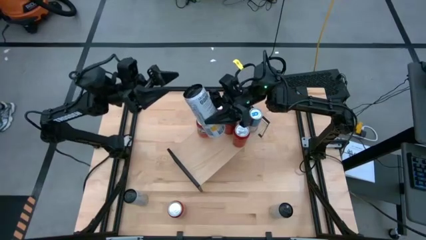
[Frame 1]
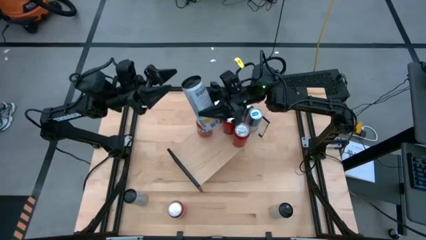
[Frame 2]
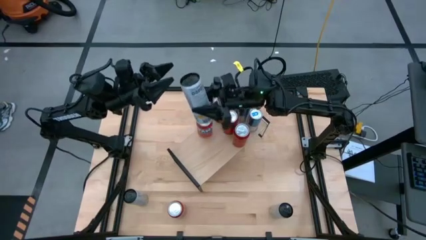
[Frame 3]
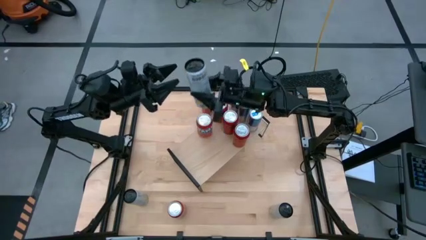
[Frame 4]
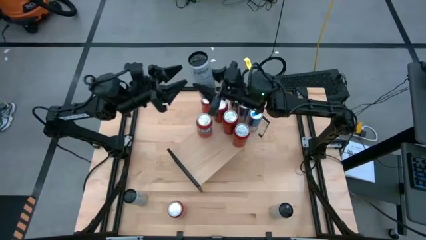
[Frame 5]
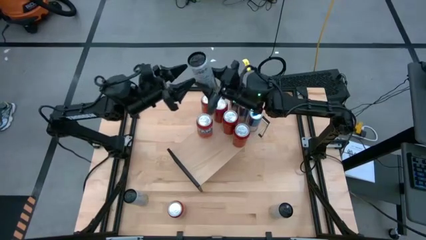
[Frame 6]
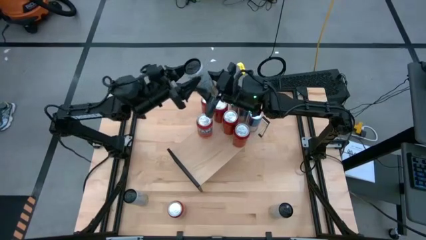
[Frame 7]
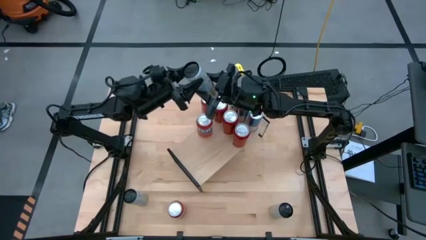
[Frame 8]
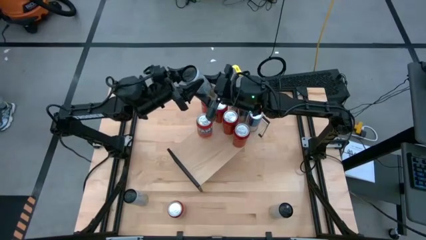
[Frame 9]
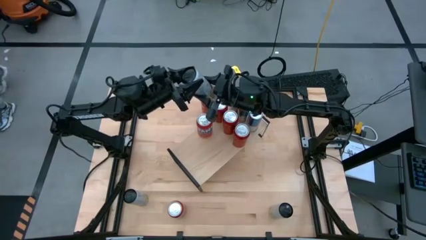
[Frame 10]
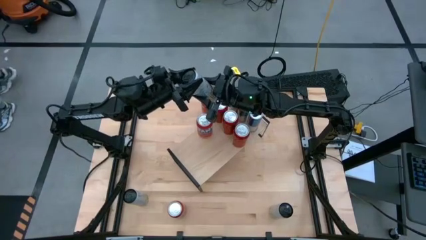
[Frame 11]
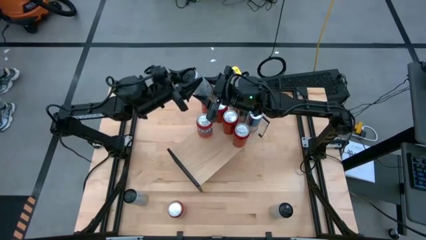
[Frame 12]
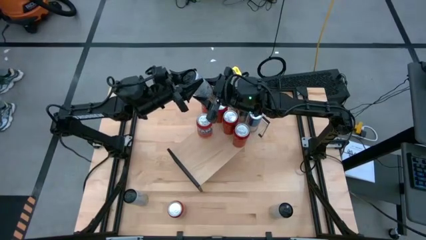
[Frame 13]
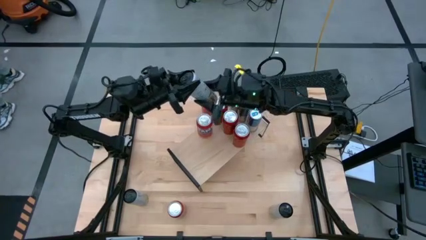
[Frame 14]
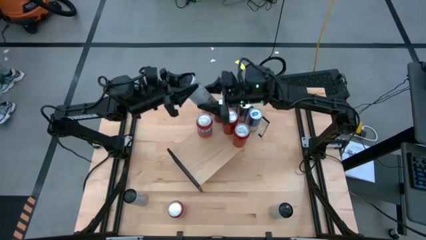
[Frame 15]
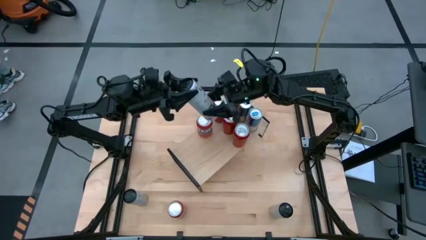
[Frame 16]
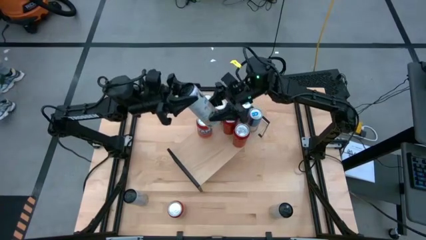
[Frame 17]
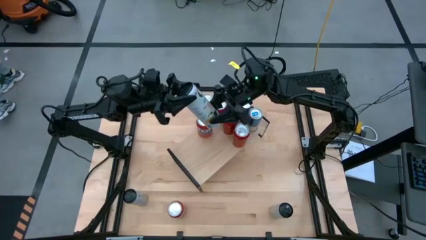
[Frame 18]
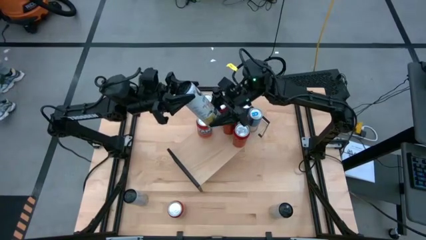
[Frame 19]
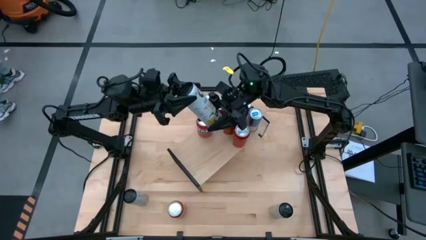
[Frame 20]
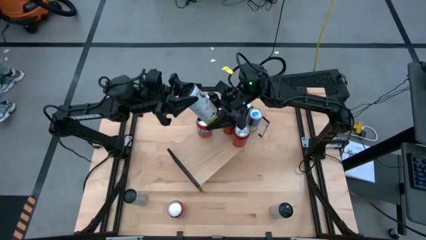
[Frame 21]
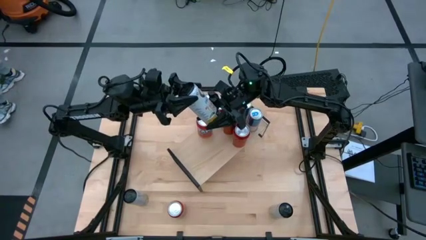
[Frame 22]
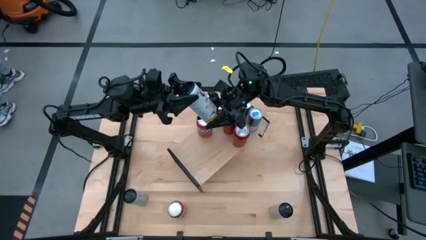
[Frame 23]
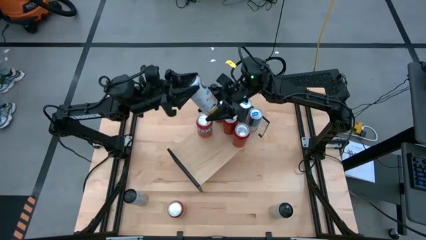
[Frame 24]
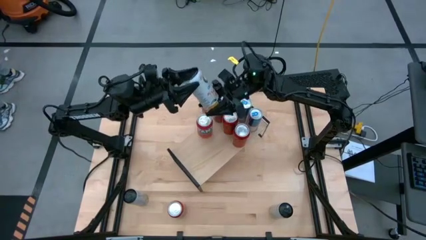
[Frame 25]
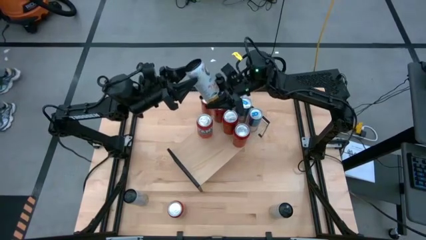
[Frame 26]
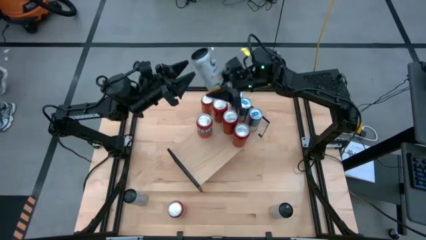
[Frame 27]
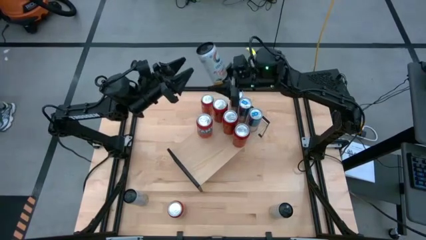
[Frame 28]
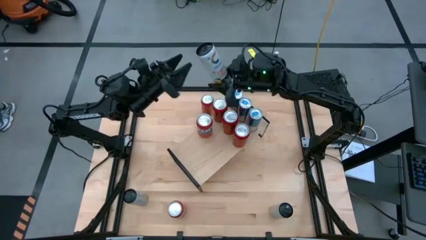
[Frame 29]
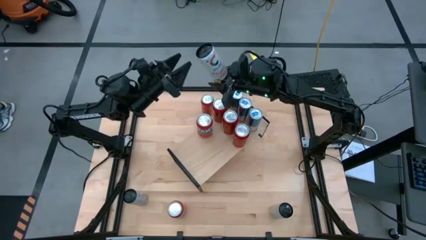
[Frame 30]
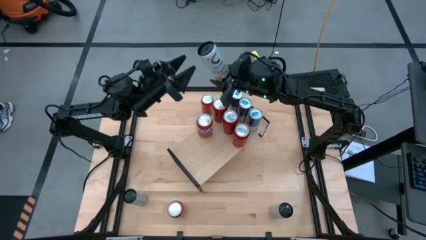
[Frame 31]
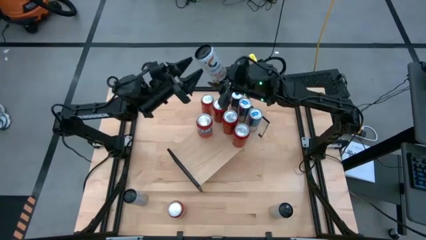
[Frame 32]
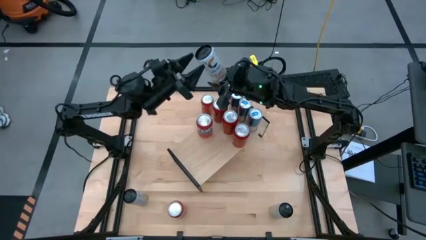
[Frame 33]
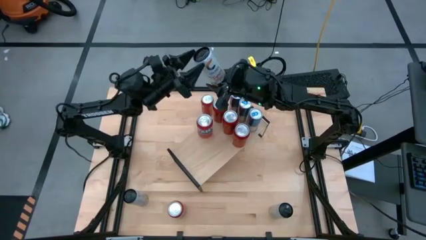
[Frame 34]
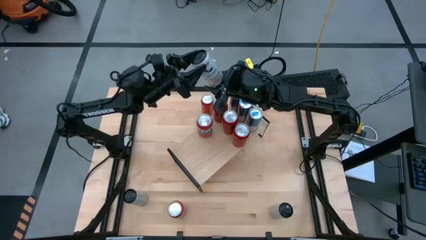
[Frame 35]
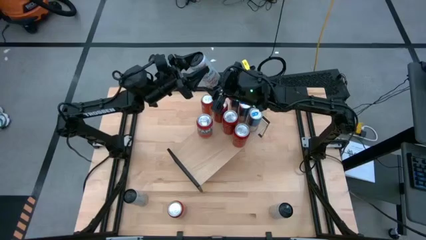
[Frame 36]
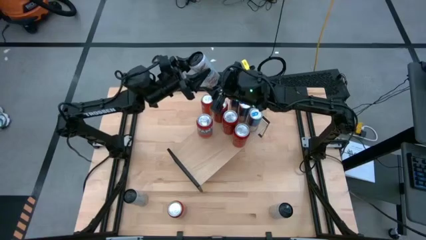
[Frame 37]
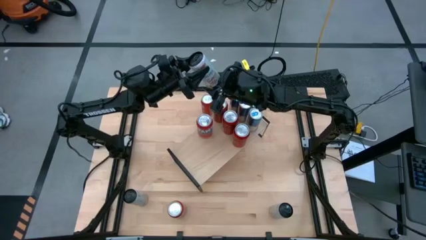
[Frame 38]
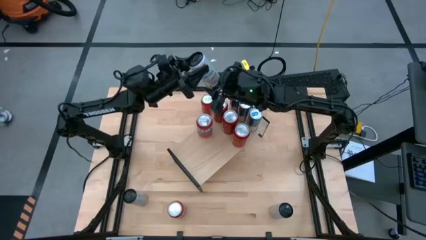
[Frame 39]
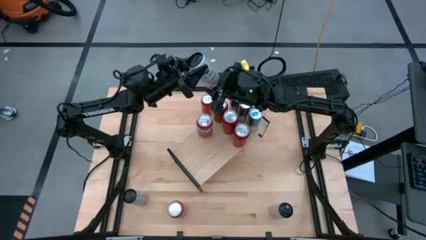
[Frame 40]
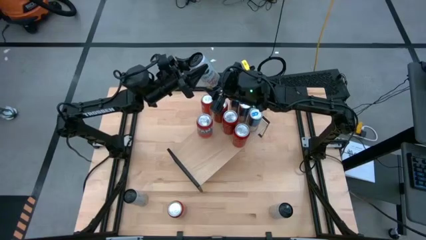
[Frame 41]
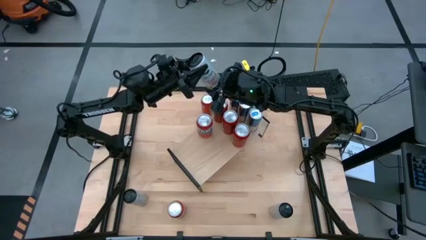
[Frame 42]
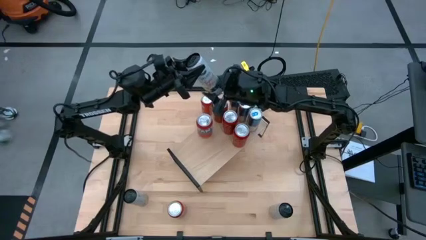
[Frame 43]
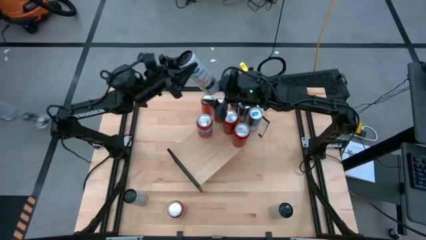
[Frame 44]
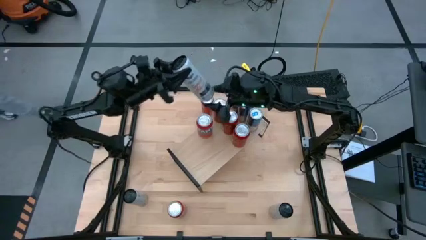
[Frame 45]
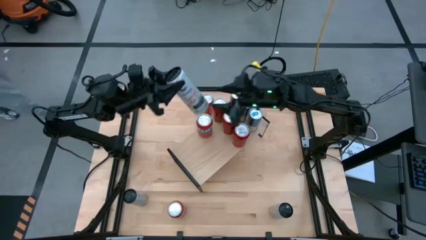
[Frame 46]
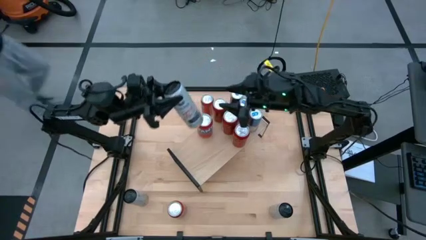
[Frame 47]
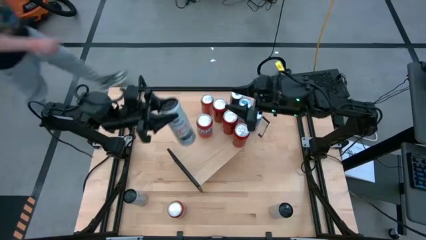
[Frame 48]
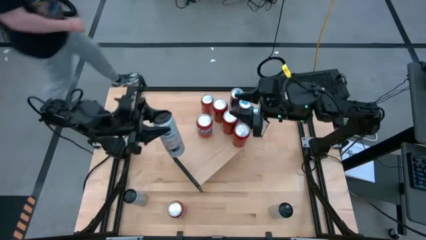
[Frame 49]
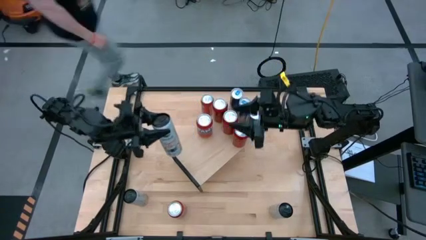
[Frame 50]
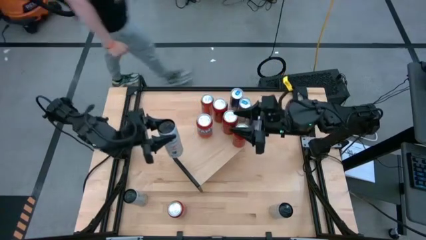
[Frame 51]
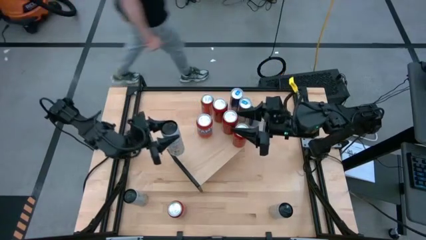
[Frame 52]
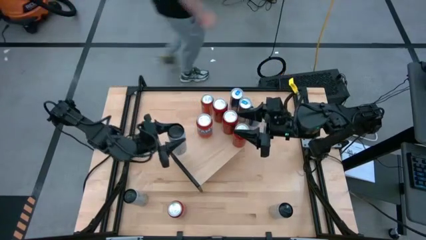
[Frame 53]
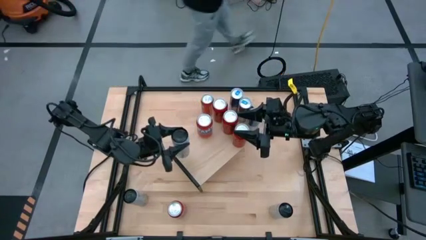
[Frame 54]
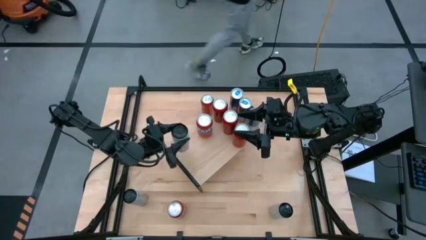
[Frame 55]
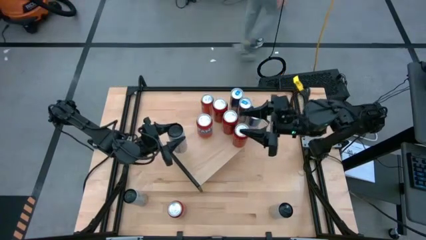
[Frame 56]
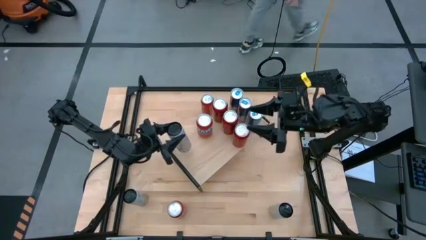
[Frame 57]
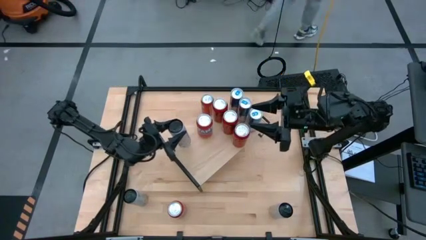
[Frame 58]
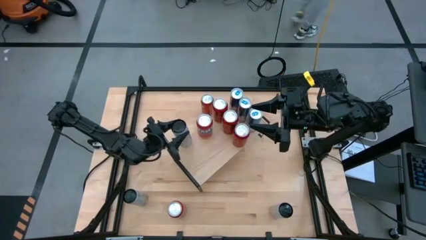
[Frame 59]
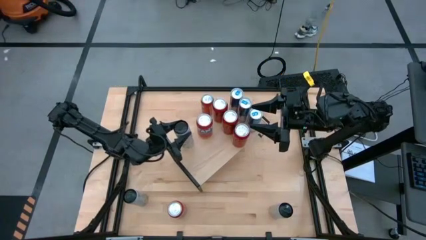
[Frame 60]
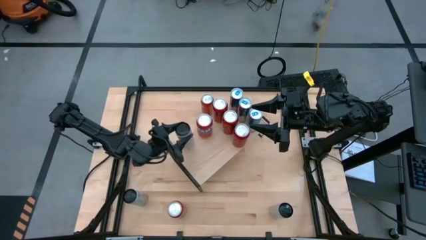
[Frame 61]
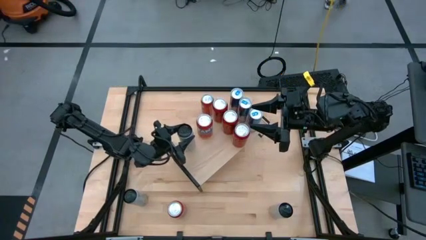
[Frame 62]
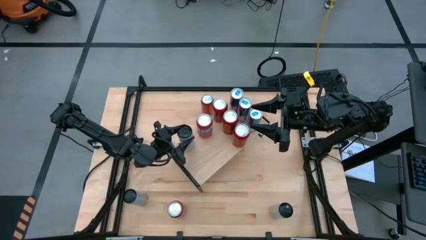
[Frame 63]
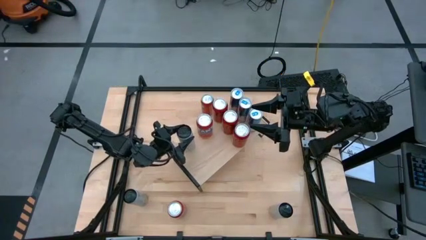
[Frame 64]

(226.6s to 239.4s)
Task: Place canned beverage on shelf
Put the top white soda can on the shelf

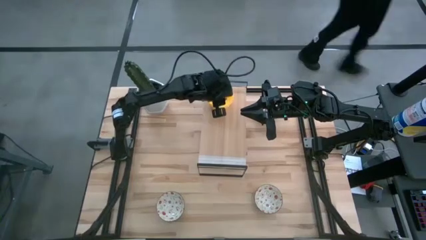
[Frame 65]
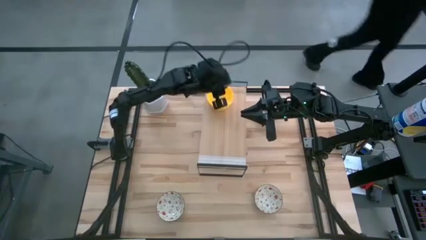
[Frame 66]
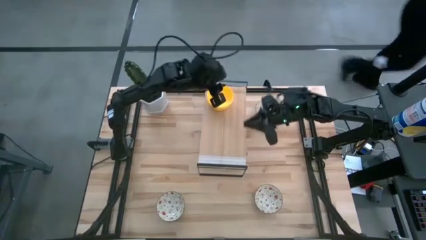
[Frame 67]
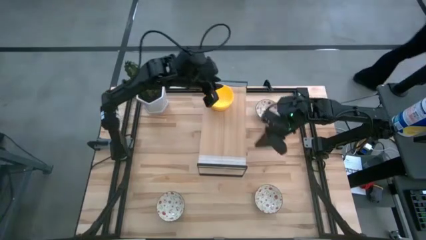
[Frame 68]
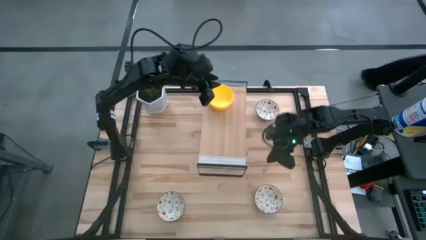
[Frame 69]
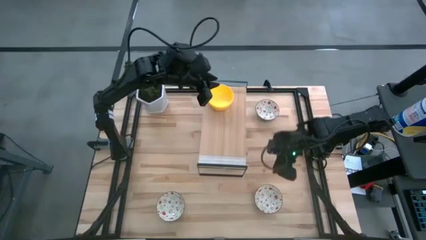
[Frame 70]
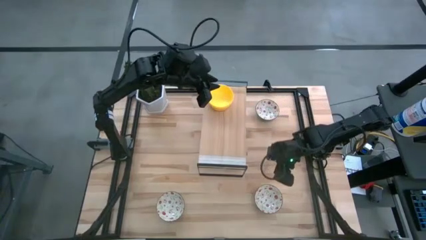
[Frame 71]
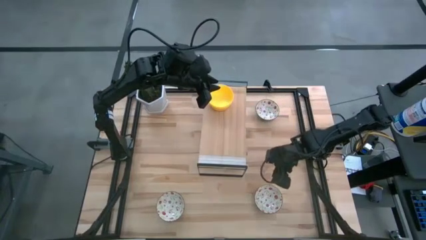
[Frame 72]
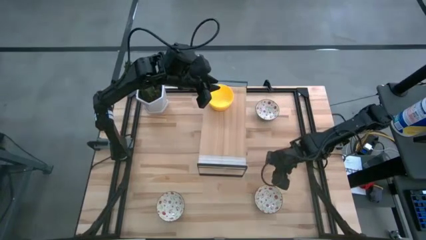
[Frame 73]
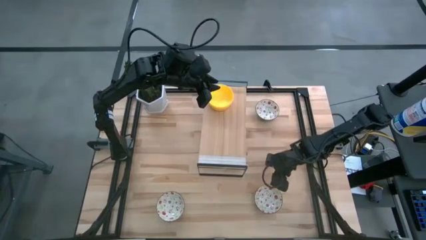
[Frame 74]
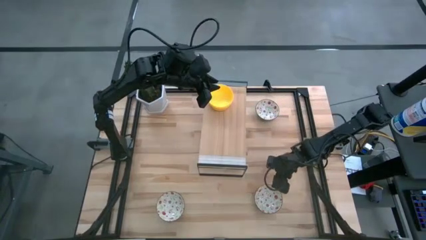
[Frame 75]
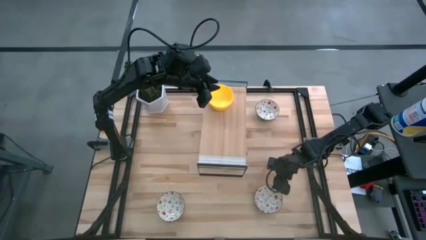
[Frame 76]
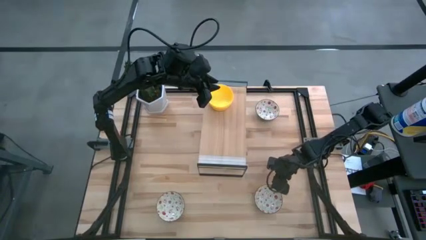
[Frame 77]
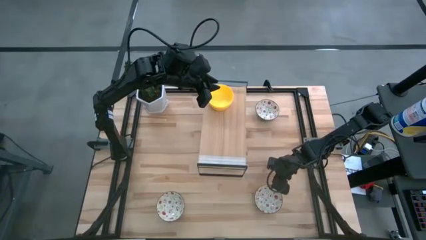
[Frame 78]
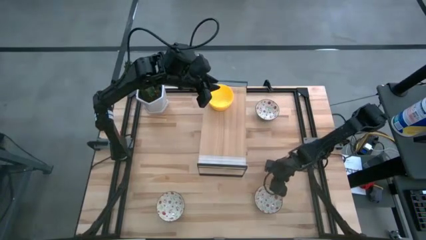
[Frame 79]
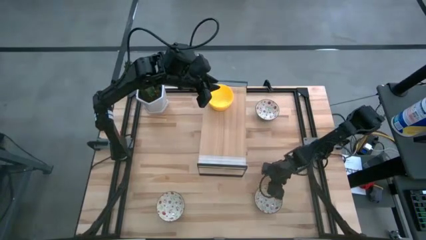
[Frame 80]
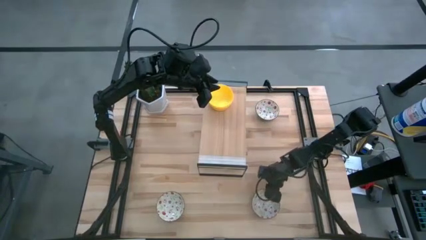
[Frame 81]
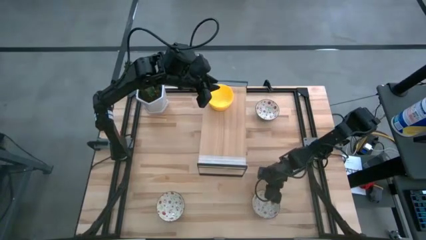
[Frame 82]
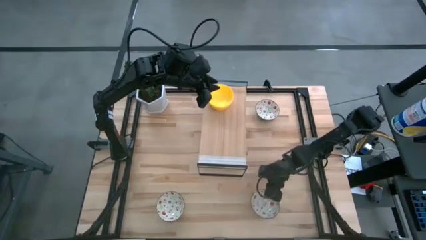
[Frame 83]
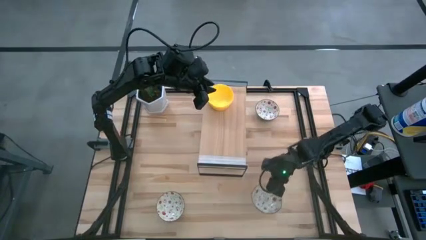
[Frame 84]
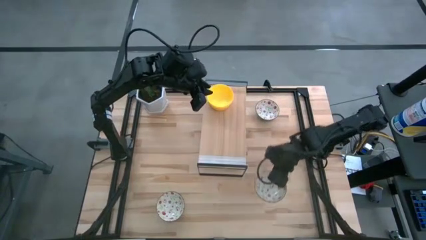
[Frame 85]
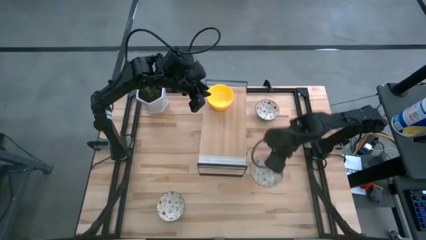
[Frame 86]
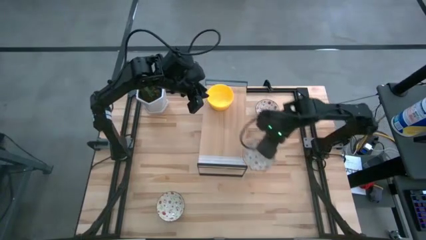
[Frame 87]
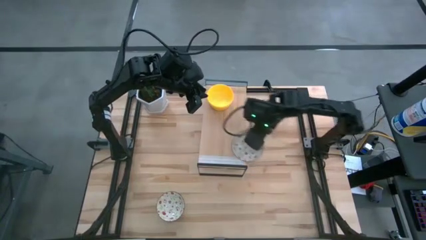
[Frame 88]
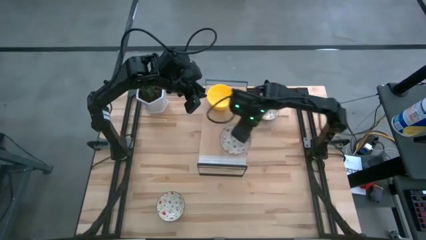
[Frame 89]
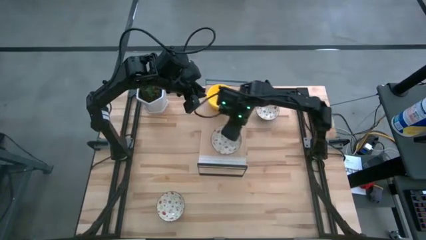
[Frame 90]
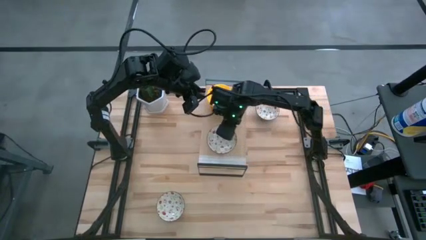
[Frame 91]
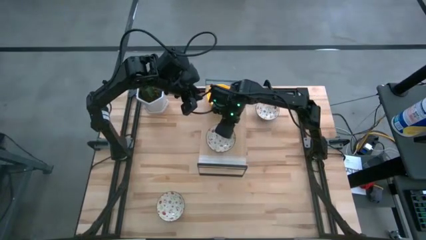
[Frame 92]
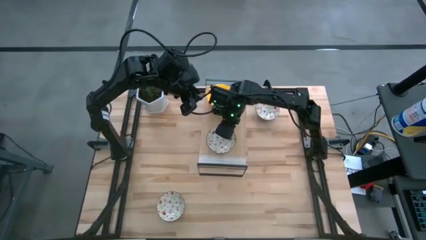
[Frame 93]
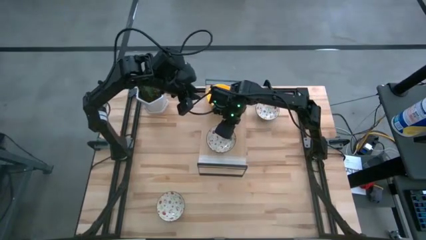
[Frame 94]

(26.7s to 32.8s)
Task: Pick & Place Mini bowls
Put the bottom right white bowl on the shelf
